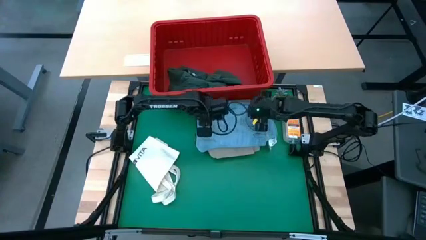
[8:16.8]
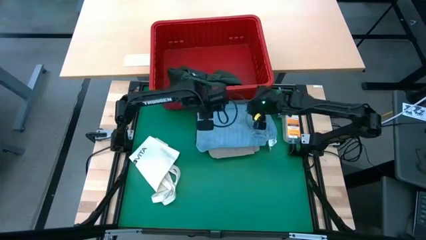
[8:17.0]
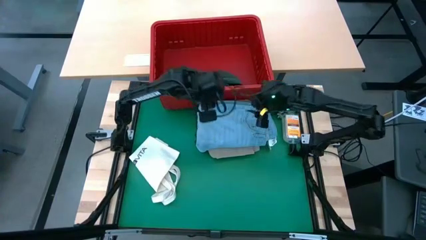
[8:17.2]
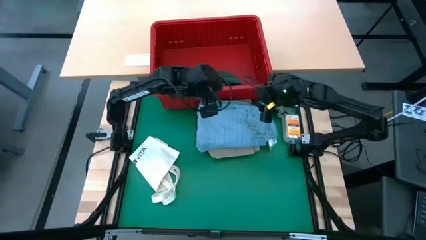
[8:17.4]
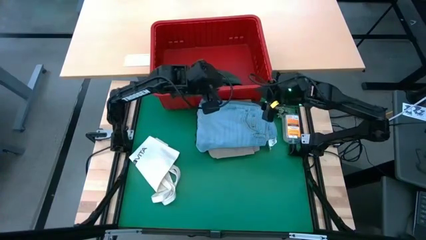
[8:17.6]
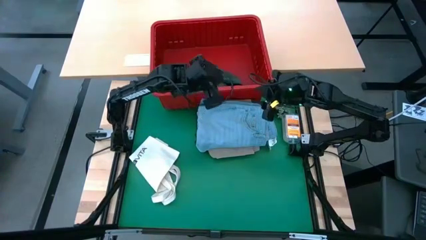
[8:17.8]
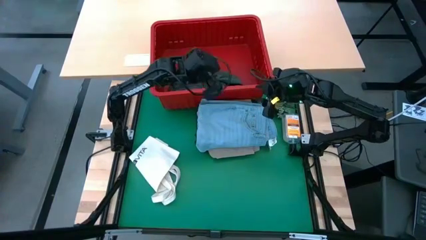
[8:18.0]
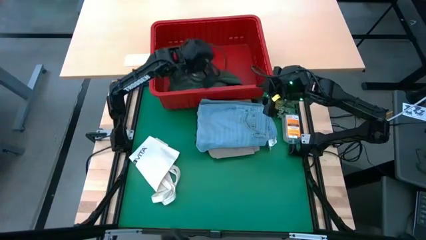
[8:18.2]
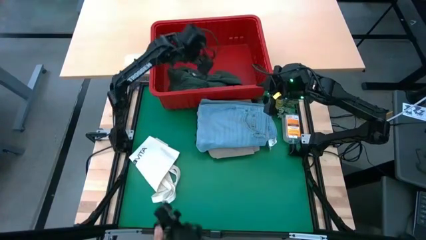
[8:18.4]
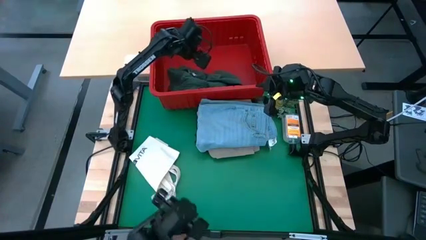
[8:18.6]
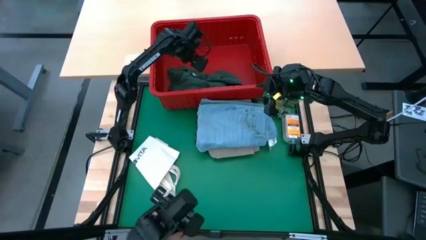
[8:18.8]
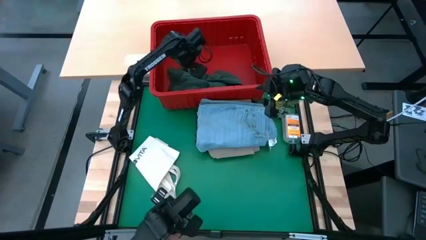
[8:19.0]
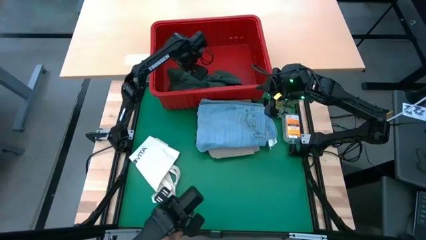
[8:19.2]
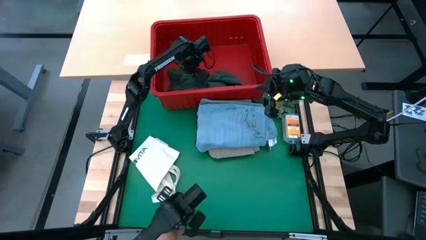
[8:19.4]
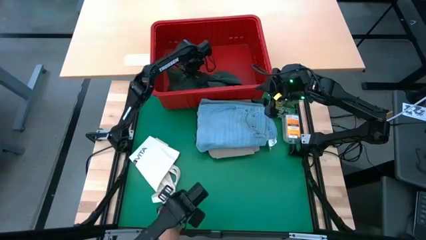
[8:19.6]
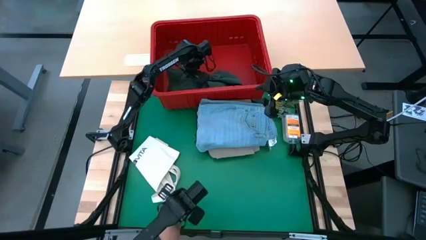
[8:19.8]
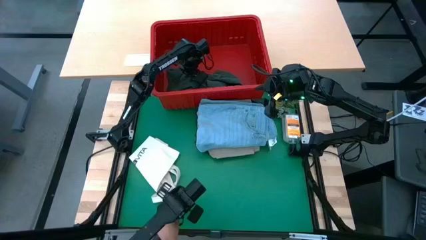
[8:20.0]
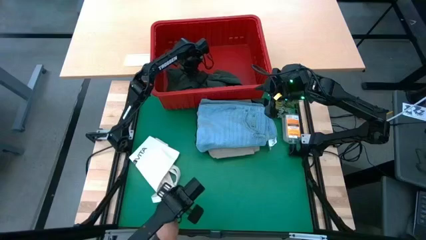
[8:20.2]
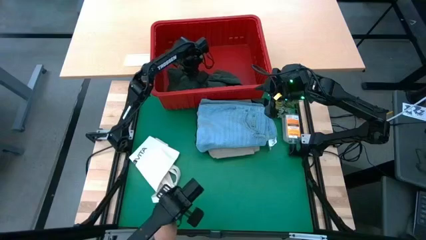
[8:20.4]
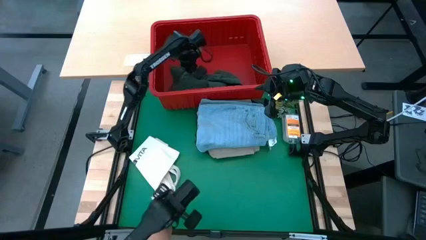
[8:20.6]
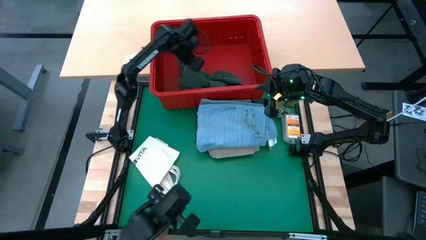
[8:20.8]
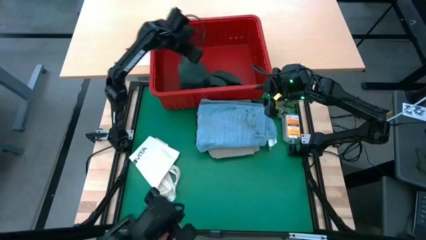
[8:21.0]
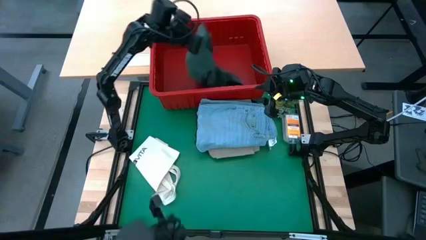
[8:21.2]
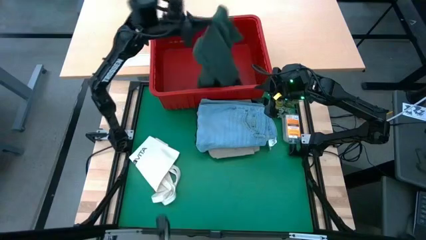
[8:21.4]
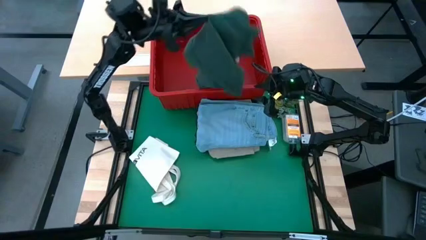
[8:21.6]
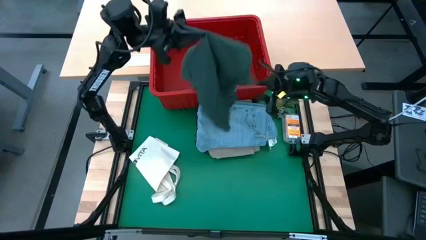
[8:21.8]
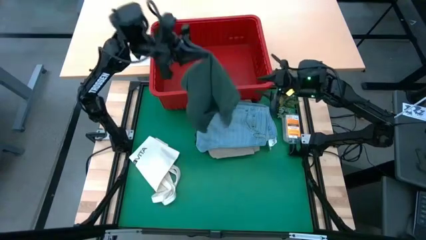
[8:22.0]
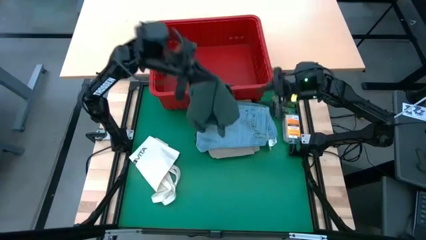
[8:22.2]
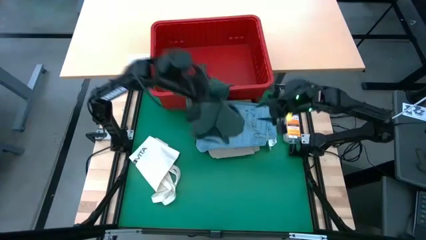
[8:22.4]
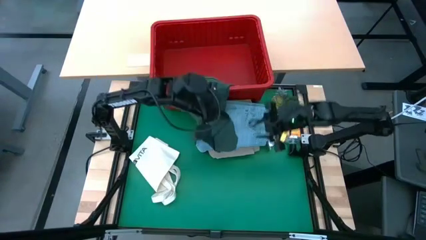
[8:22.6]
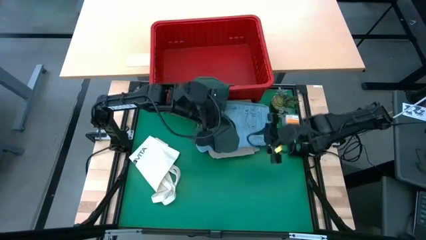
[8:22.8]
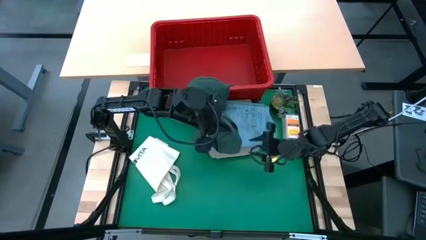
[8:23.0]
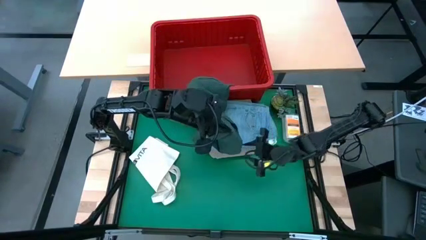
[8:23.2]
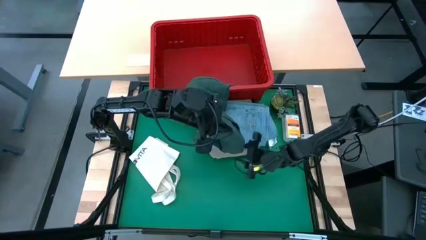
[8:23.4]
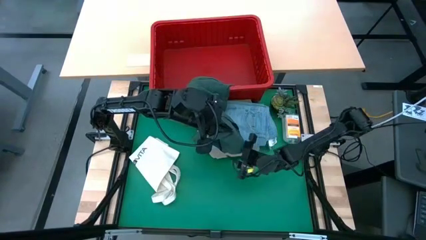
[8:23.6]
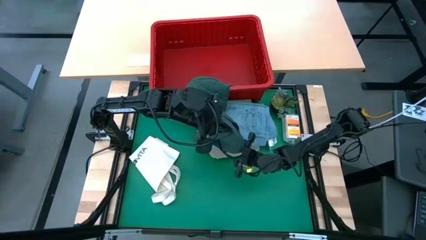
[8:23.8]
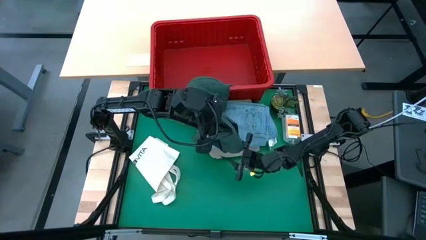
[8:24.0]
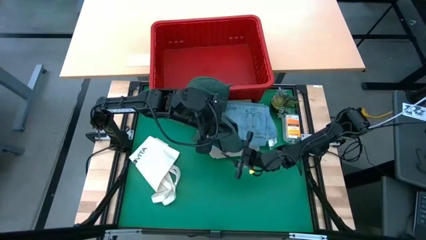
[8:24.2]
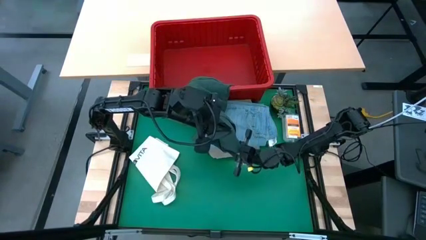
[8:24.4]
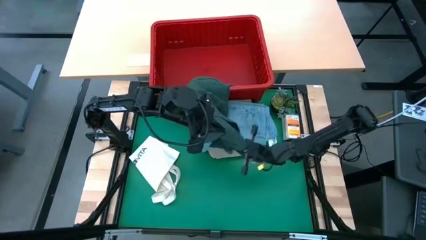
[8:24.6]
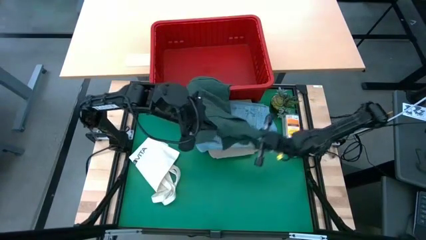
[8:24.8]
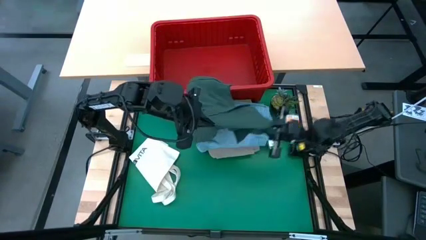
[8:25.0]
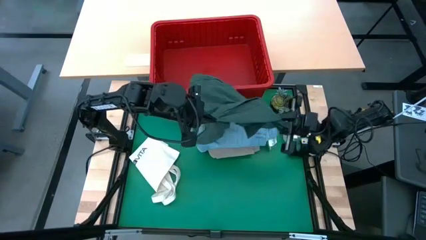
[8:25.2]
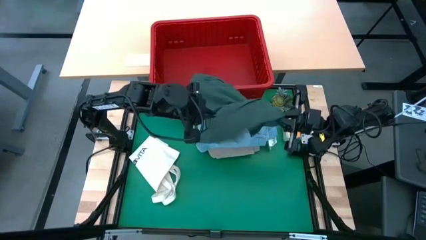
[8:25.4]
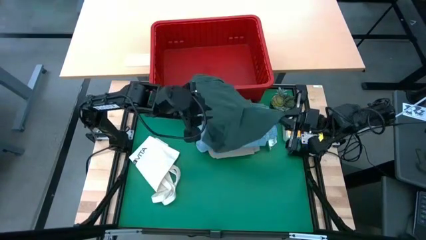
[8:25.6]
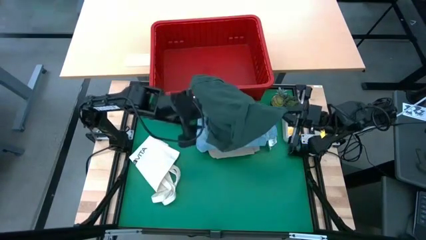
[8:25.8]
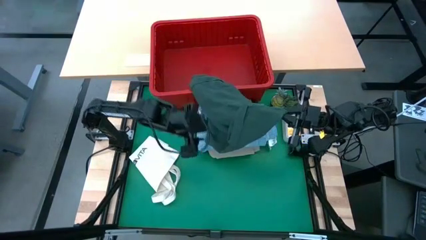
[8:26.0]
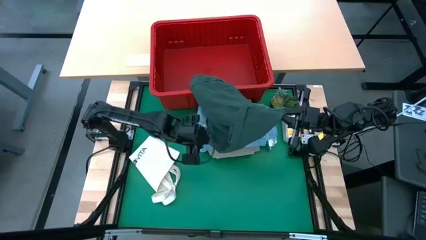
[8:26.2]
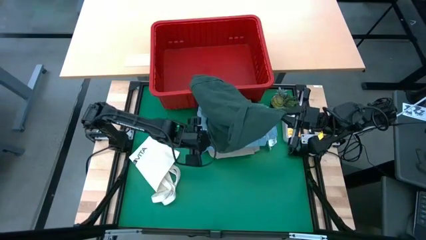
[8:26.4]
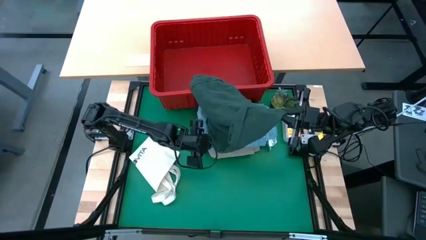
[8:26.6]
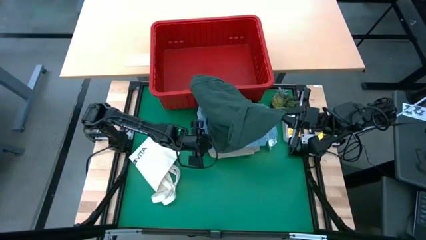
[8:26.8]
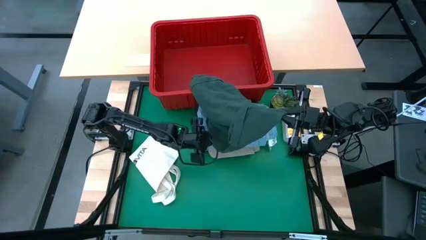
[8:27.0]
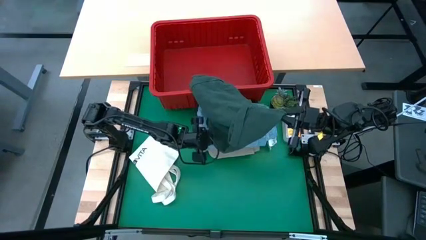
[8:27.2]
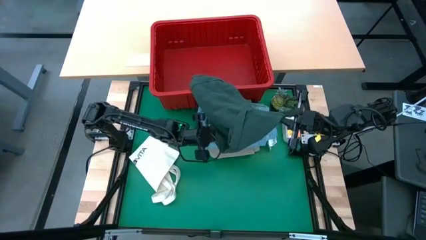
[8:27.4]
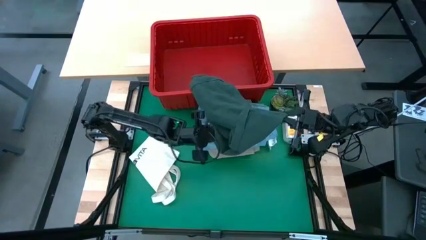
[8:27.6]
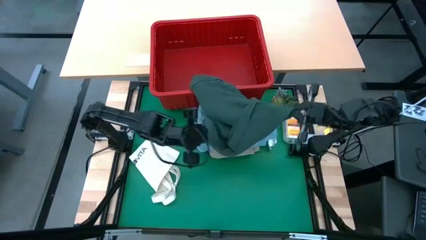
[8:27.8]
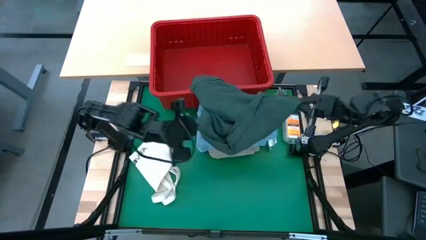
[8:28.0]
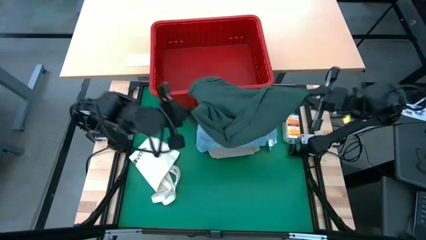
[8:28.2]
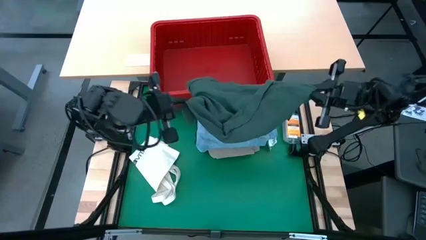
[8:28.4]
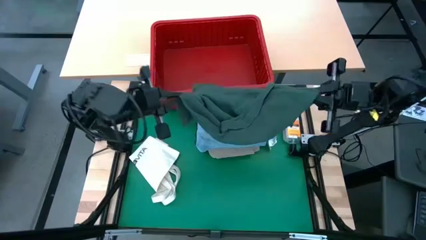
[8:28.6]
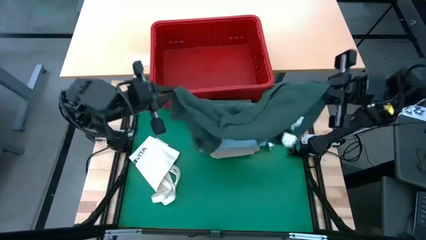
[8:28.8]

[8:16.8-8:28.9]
Task: Fold laundry
Remove green polo shirt from the laundry bin

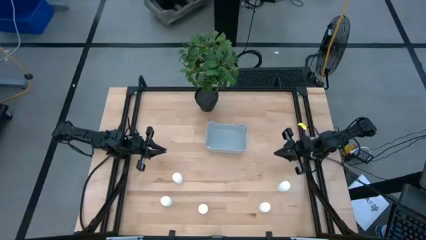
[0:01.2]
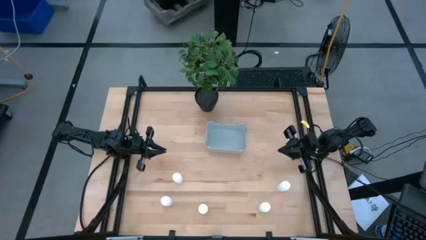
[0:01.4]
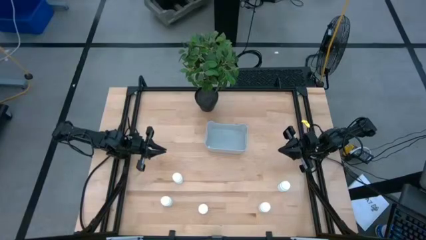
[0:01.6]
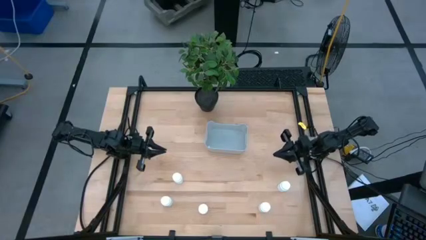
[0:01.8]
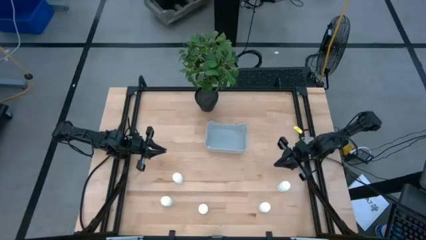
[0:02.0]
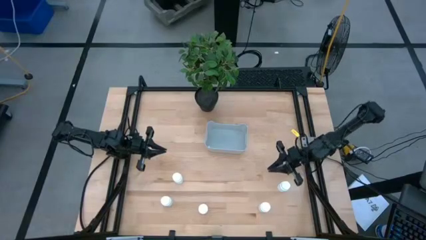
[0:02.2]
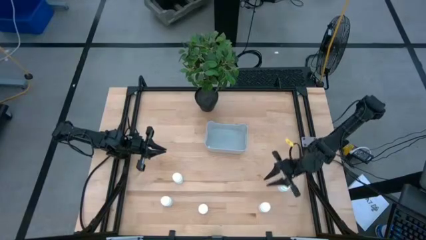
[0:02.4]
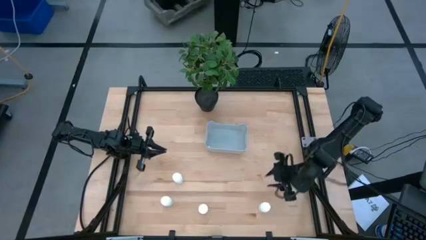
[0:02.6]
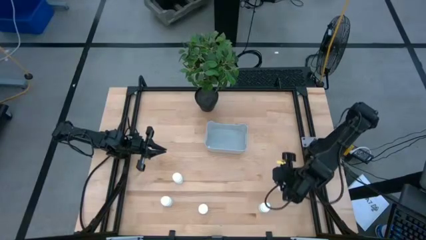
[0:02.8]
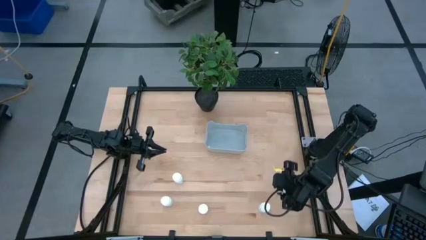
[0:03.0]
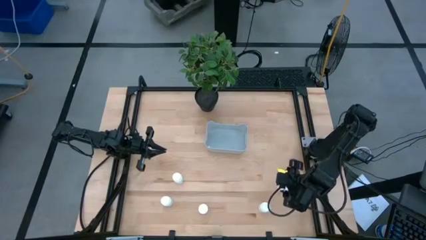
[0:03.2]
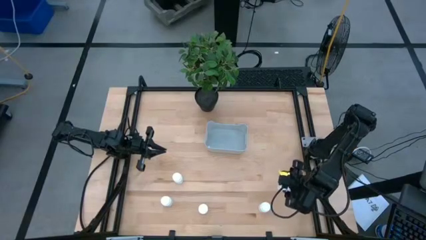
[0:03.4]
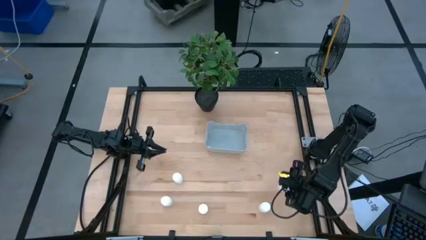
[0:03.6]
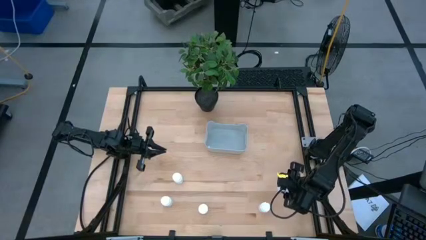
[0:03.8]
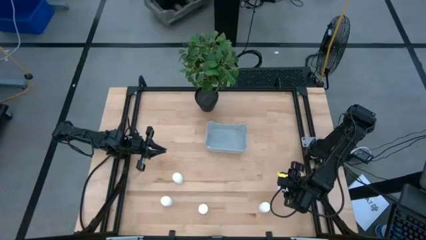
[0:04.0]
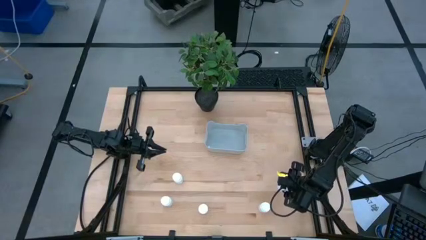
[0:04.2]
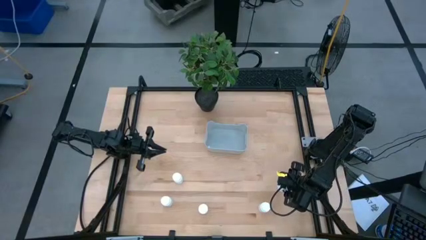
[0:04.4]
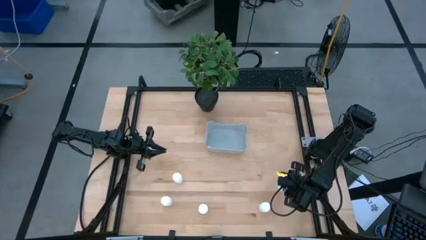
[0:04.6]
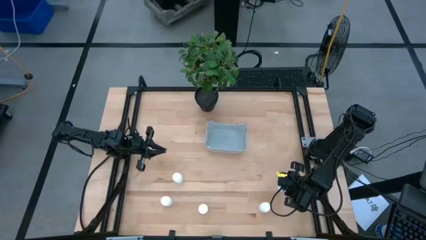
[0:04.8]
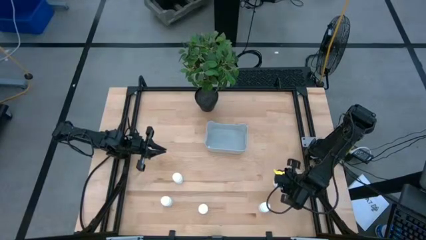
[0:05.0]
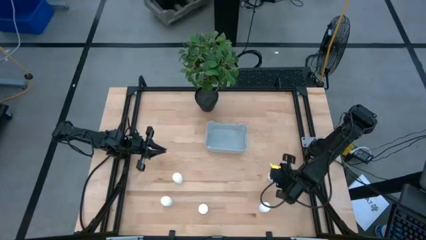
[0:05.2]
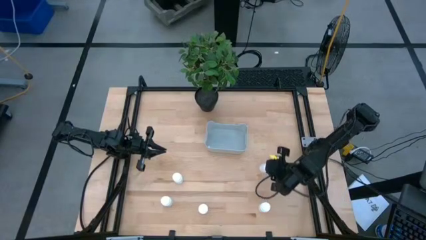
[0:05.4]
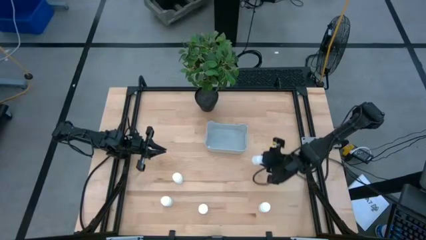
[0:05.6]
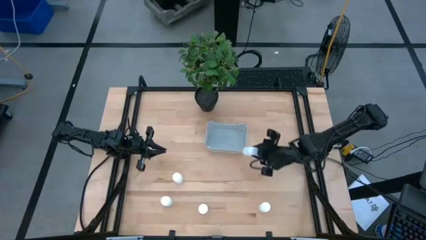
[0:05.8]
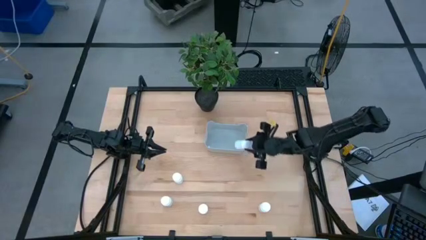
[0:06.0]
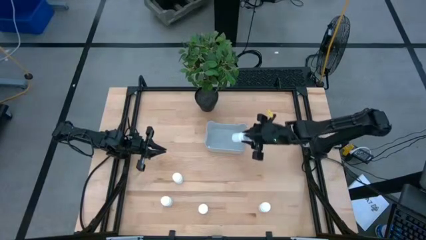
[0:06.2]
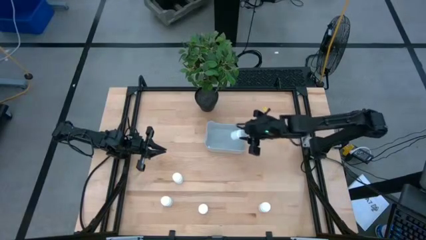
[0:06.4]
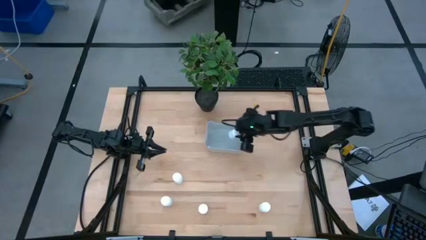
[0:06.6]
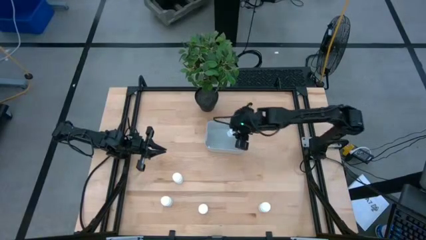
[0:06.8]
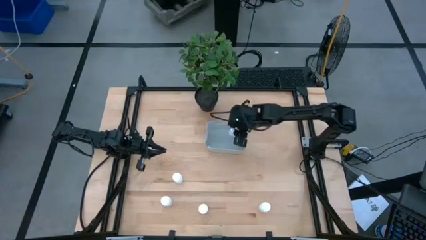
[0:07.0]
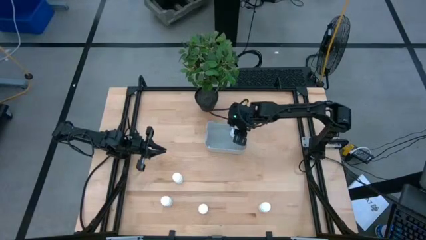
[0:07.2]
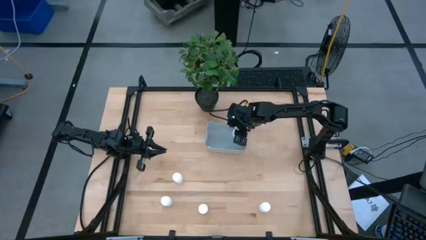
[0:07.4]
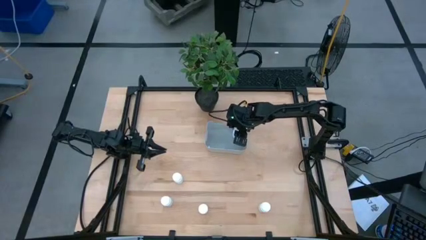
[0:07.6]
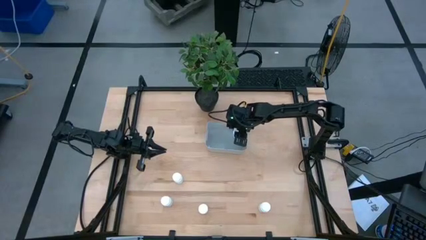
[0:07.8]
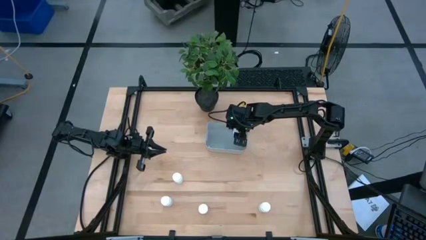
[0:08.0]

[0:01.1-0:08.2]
Task: Pick and place pill bottles into a basket
Put the white medicine bottle into the gray bin
